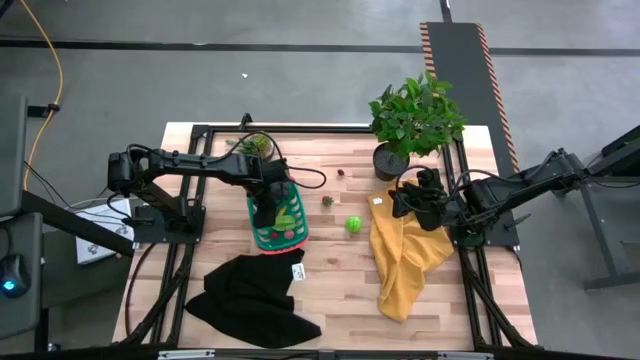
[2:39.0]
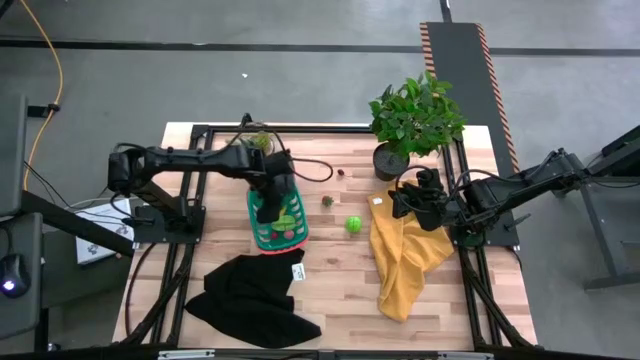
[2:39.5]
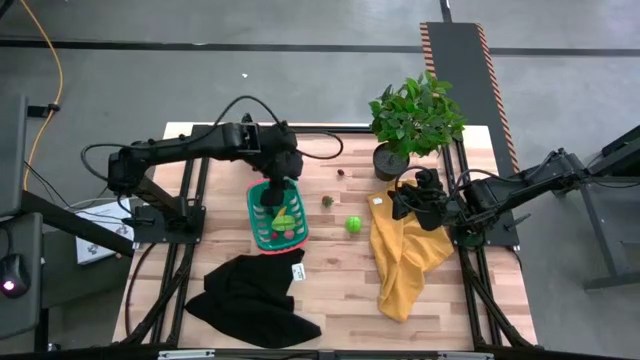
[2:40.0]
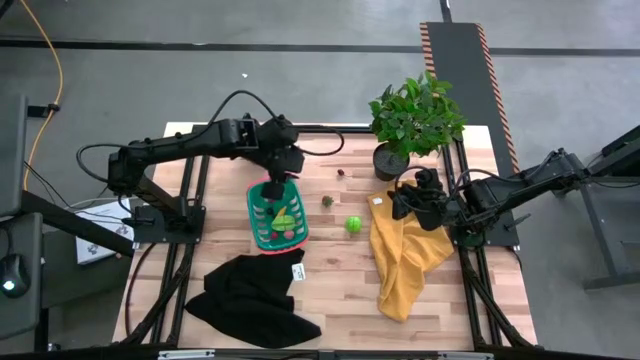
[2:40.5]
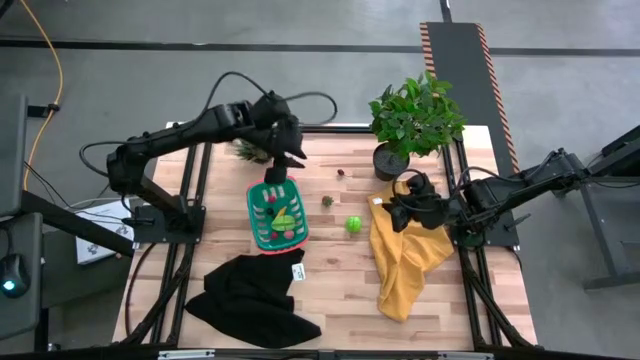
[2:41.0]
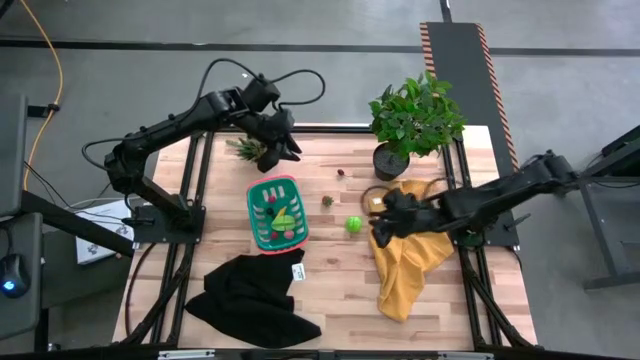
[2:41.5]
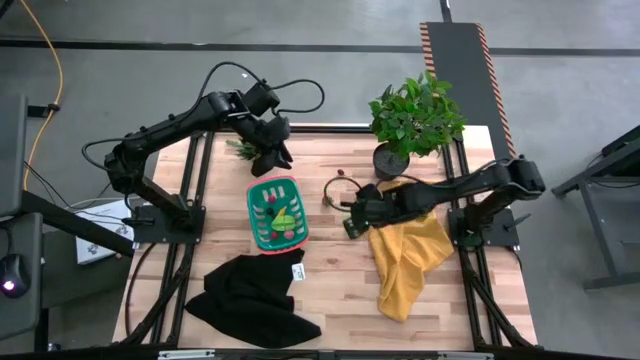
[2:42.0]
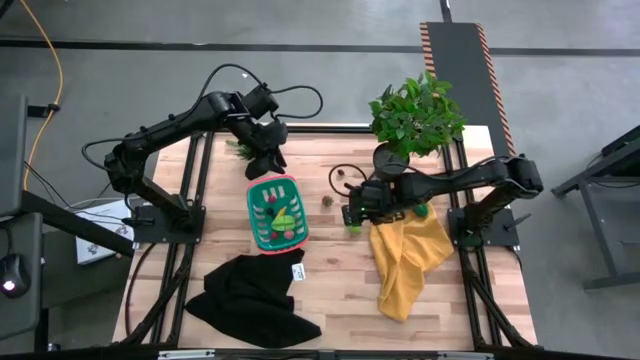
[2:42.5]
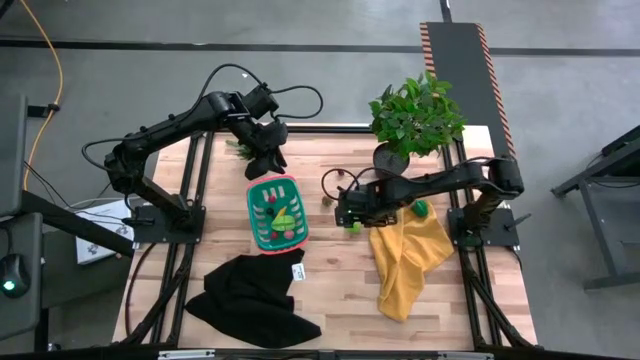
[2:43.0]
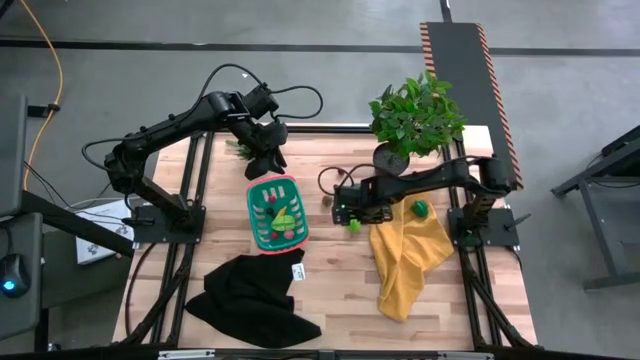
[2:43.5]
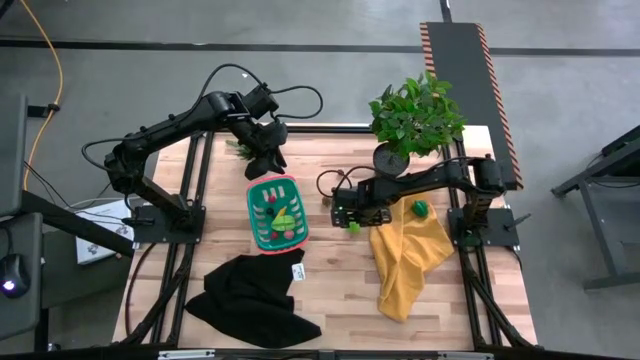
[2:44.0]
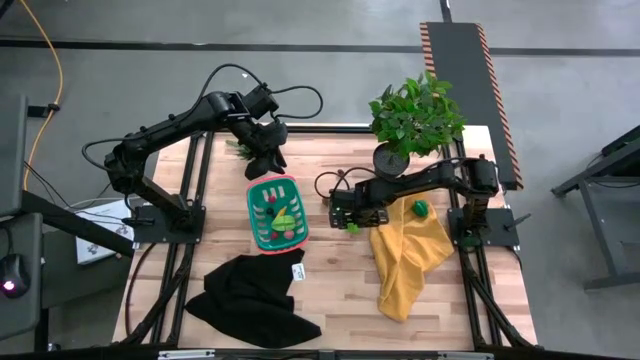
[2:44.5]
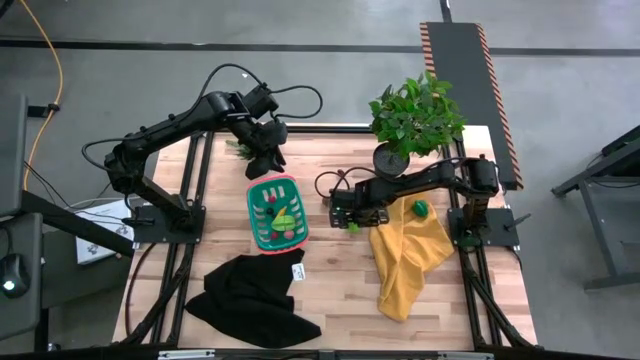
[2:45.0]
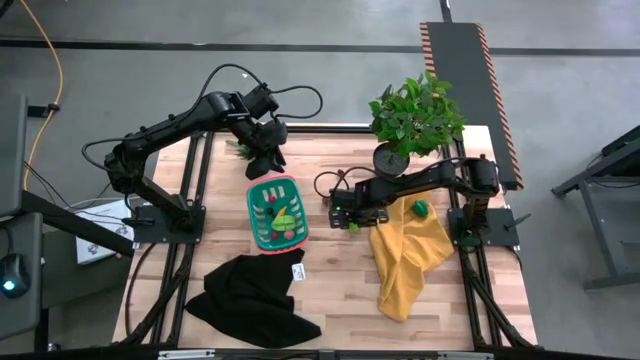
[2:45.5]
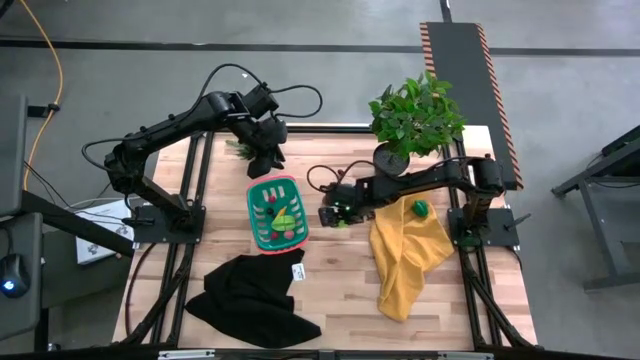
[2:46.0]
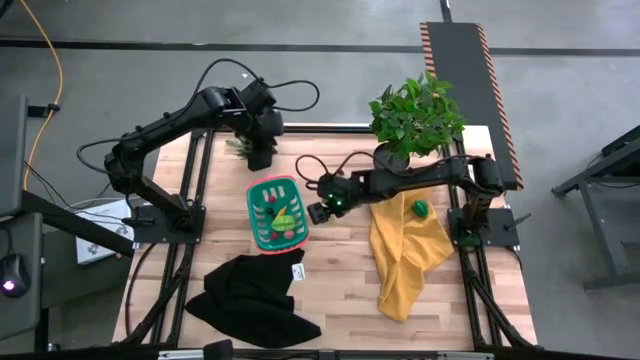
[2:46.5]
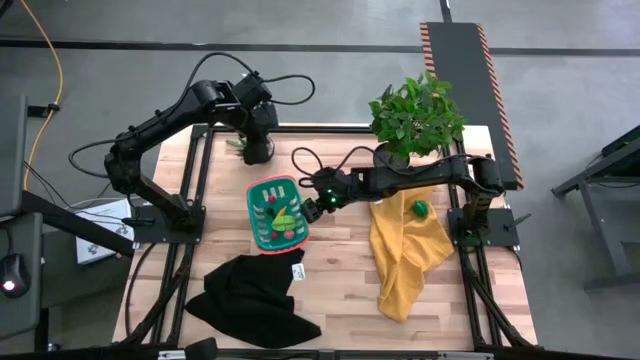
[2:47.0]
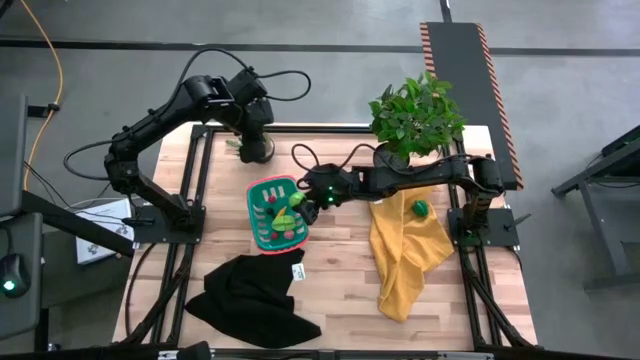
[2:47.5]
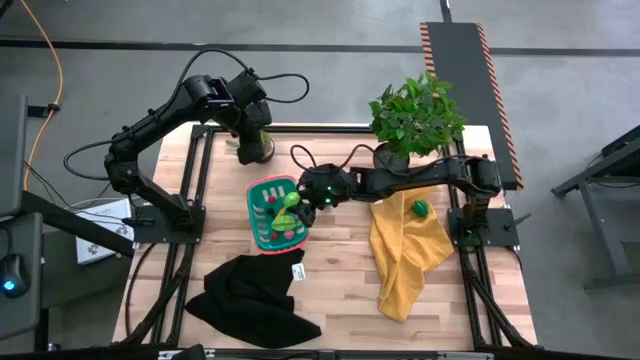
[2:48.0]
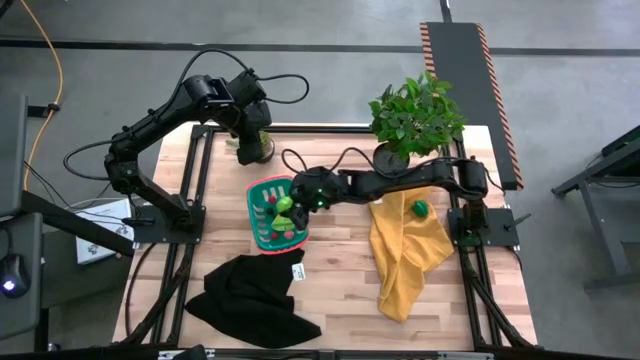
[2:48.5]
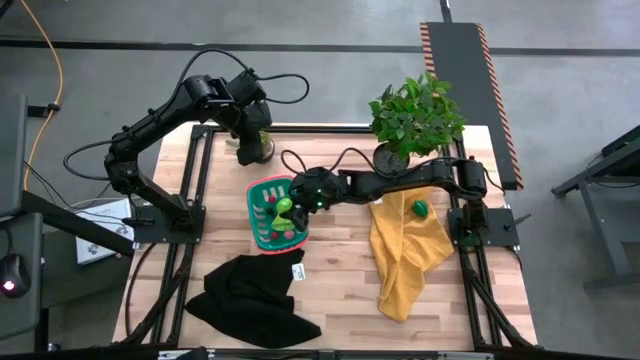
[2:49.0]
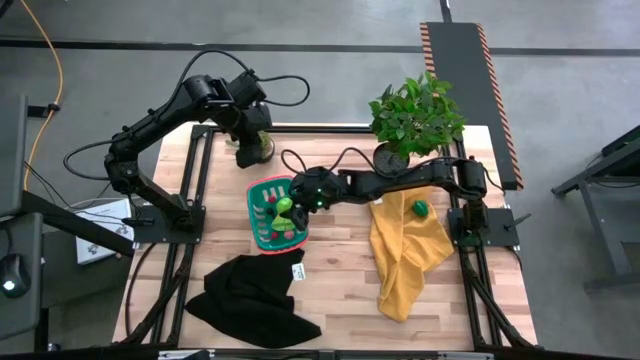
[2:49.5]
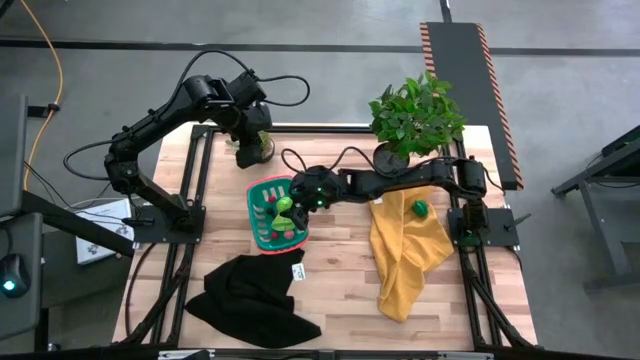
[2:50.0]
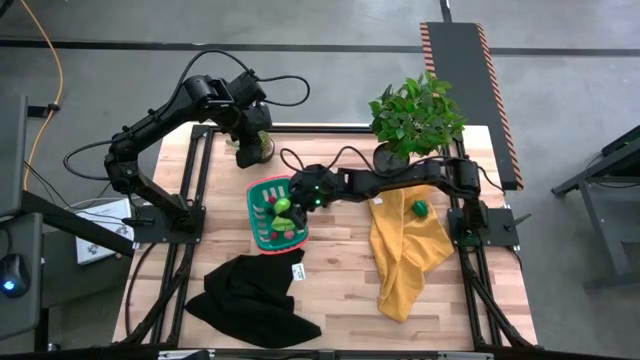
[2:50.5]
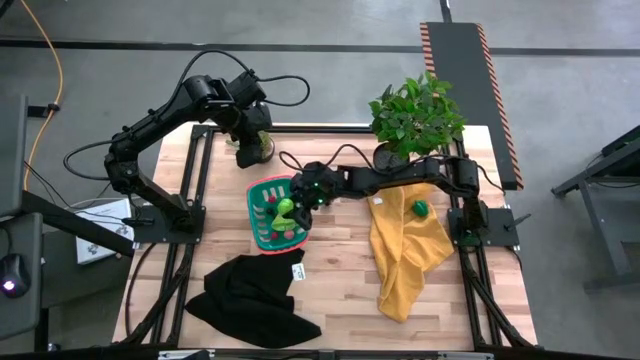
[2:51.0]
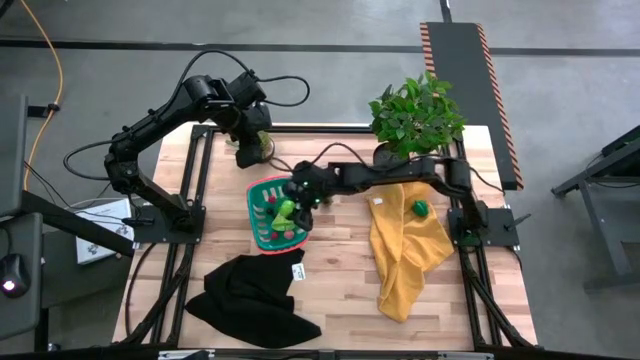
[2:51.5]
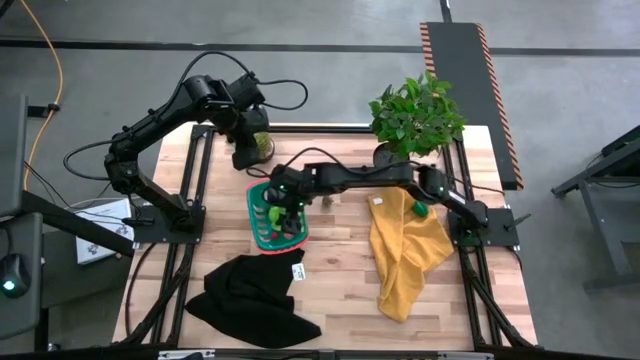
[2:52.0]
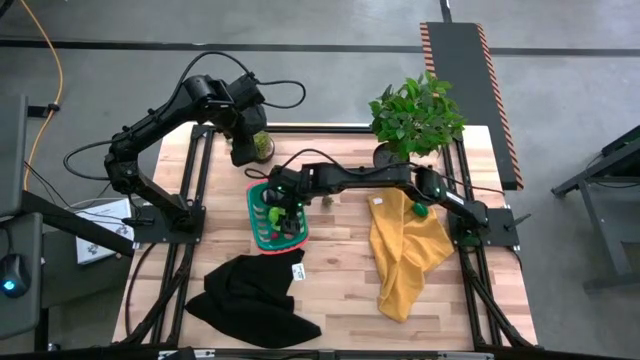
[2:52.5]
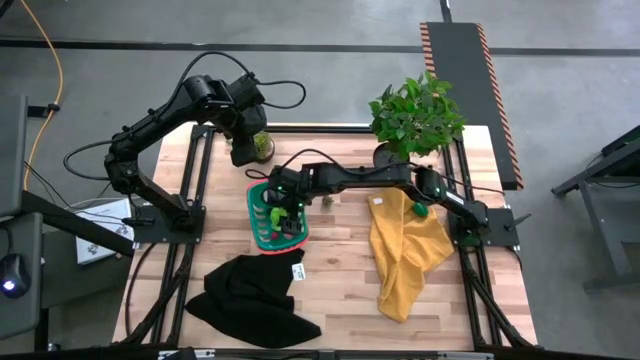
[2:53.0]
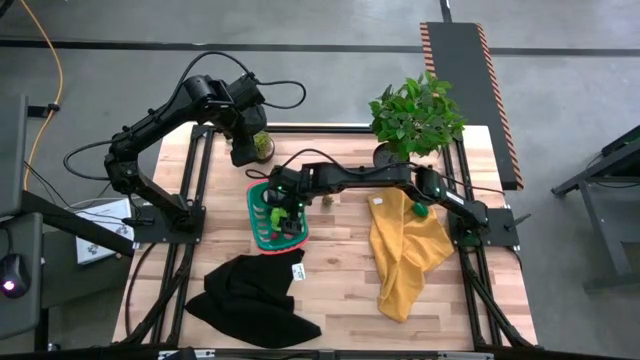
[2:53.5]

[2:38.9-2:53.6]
Task: Pick and placing Produce into tupperware
Put the green cabbage in the green basket

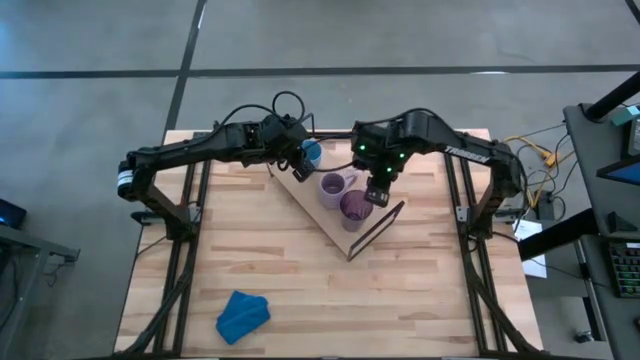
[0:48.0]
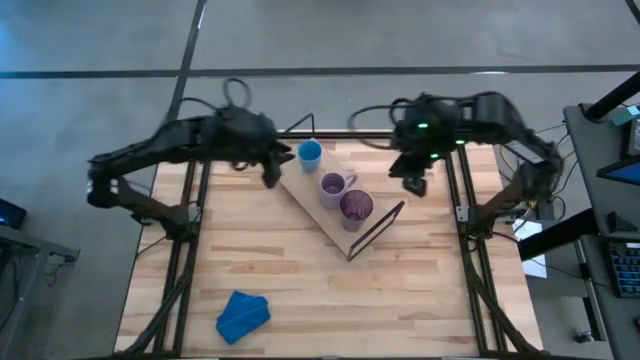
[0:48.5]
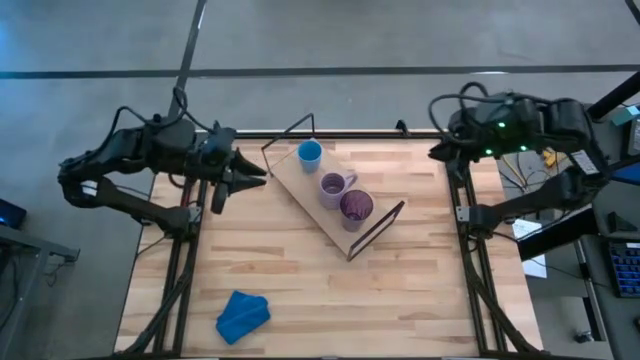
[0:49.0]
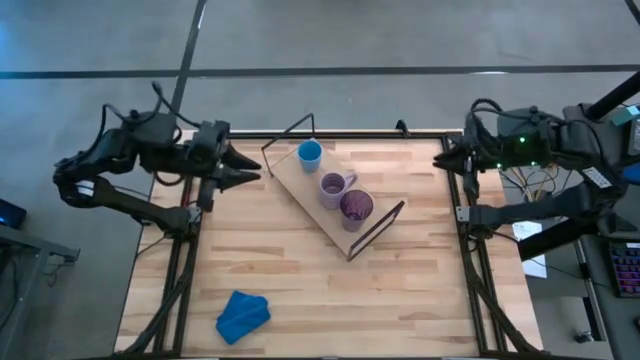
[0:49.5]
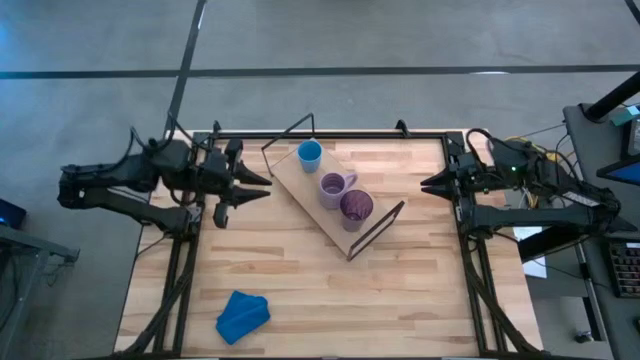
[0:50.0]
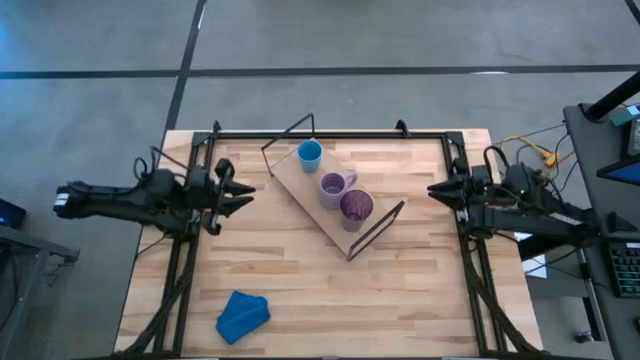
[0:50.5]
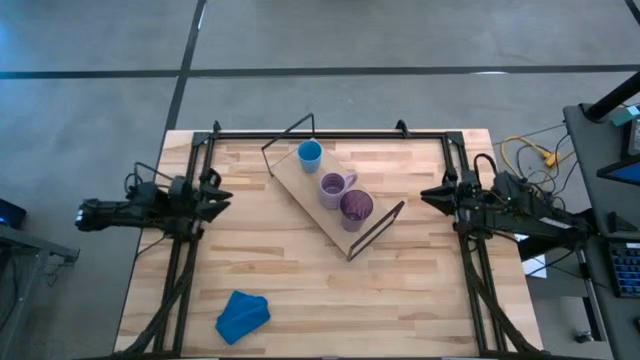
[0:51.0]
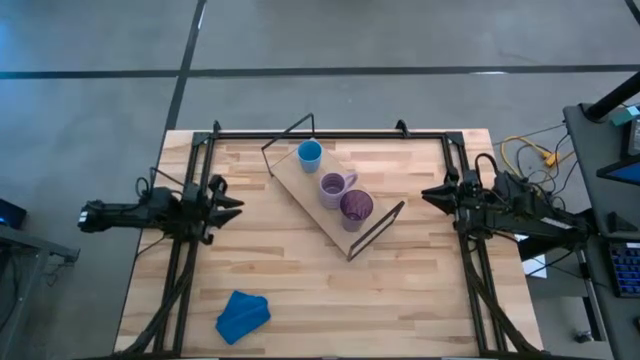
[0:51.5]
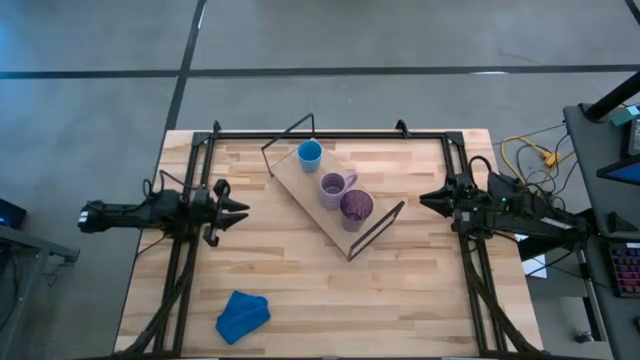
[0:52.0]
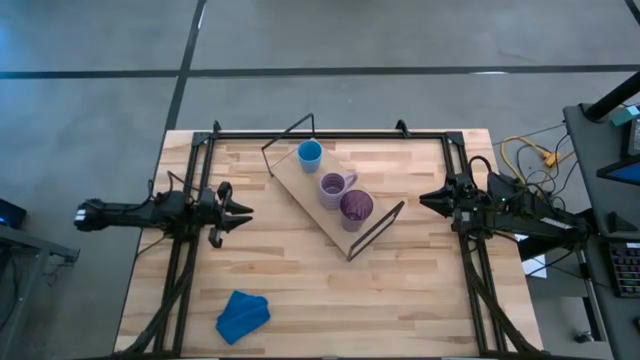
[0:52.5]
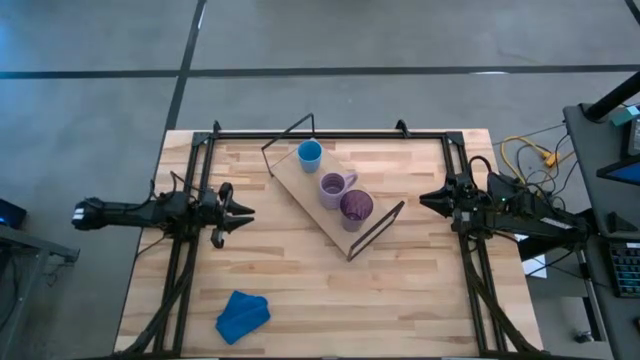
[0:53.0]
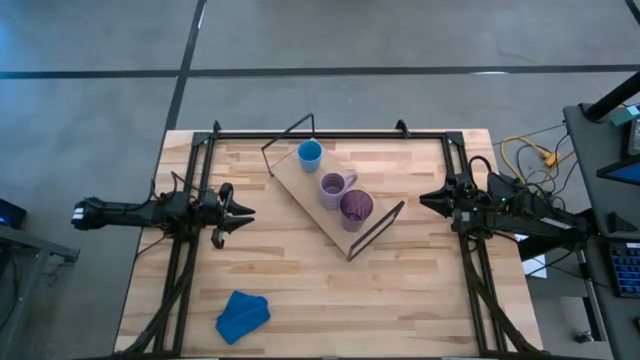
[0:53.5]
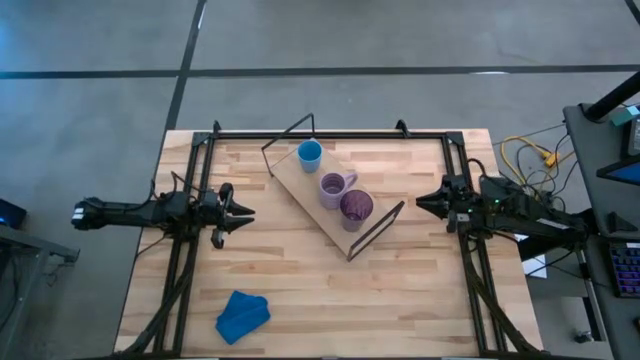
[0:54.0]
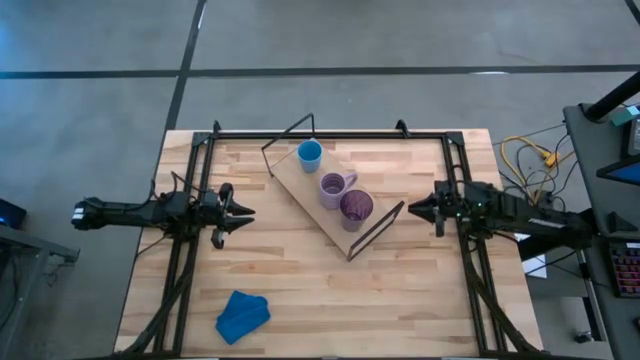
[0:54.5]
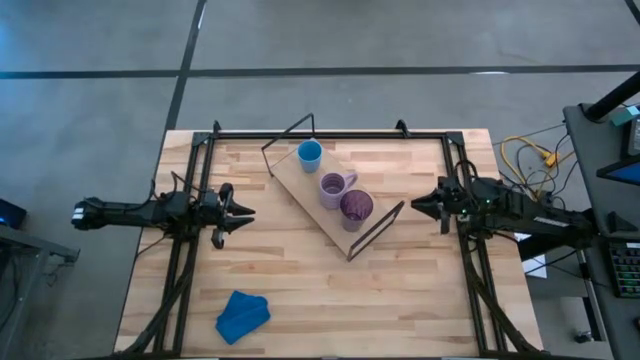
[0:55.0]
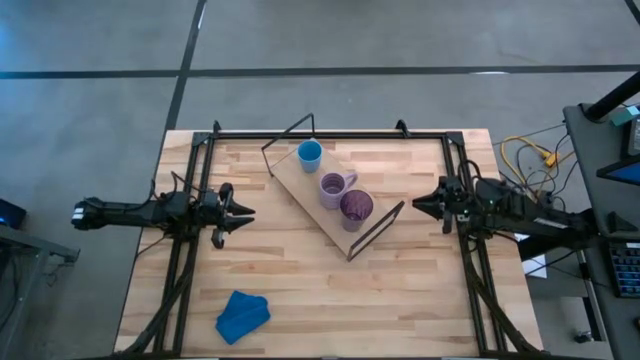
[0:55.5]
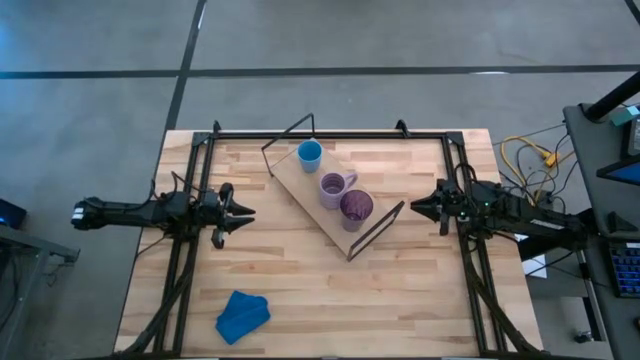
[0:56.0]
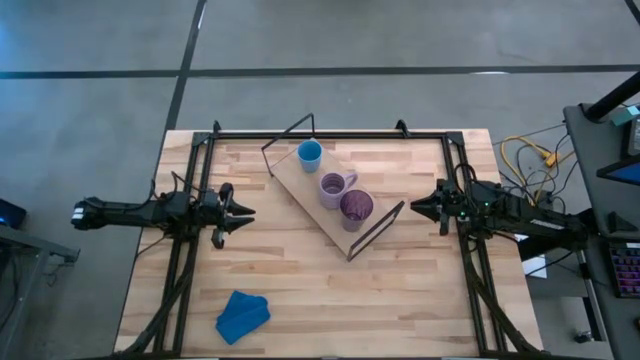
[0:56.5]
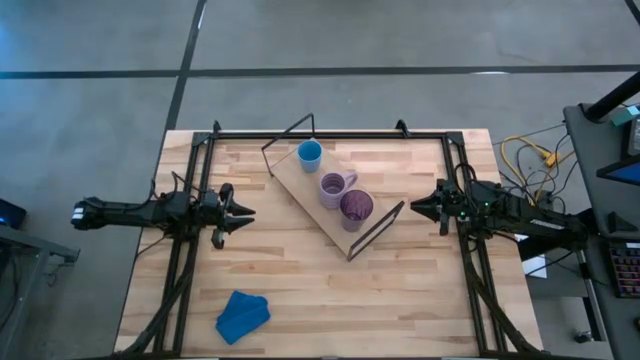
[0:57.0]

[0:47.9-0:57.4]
Task: Stack small to large cups/mugs on shelf
Return to Home Position
